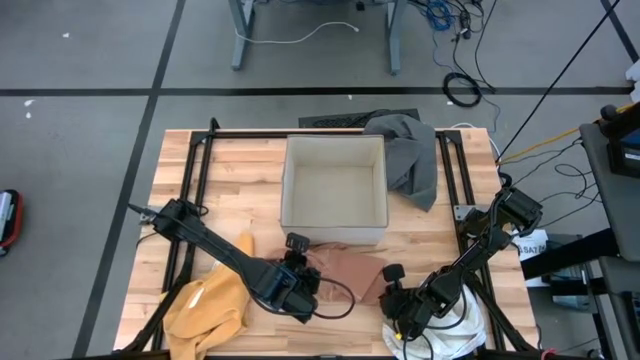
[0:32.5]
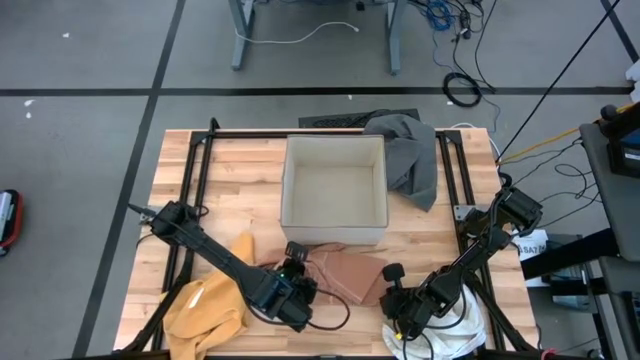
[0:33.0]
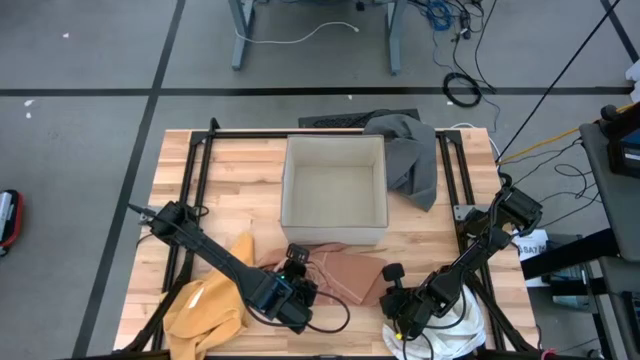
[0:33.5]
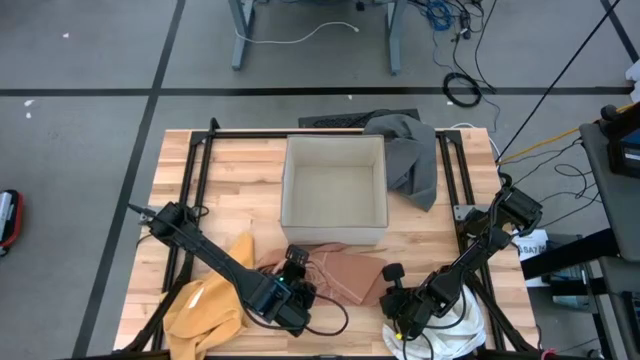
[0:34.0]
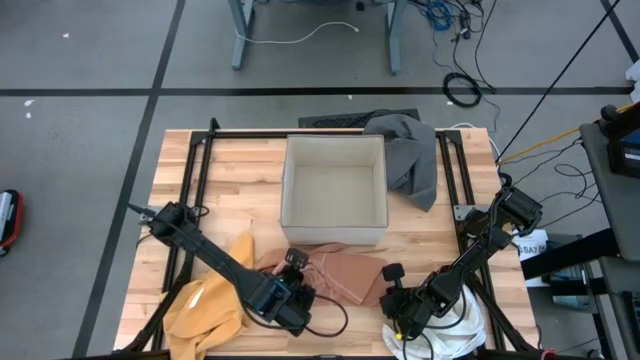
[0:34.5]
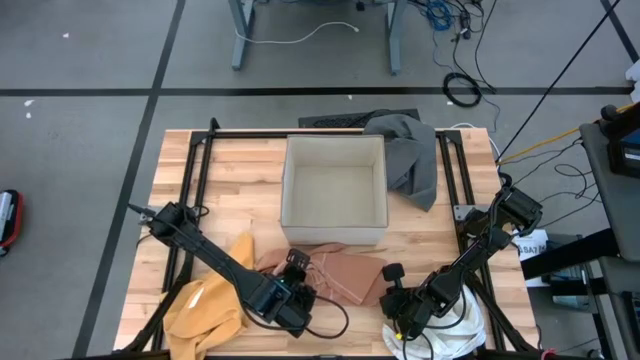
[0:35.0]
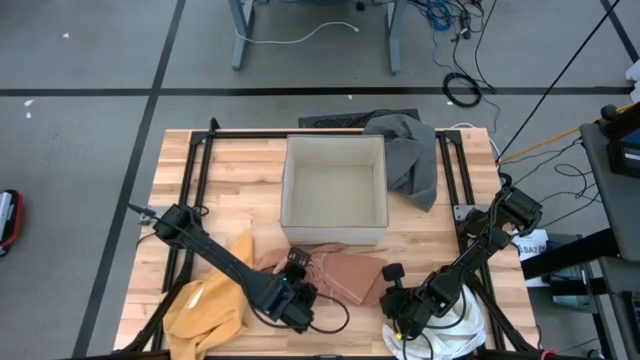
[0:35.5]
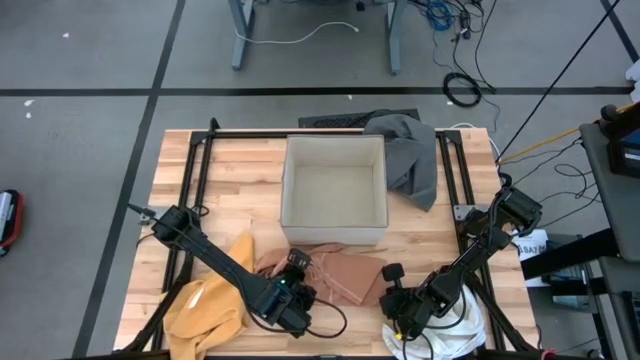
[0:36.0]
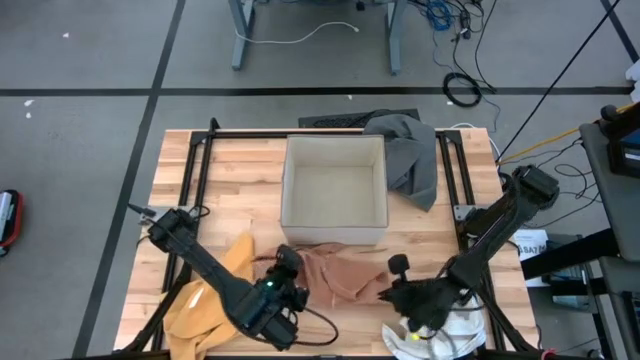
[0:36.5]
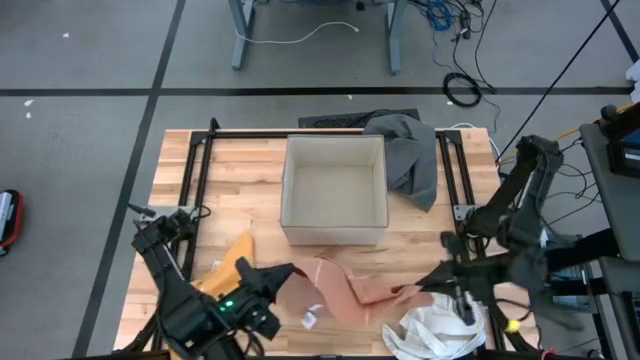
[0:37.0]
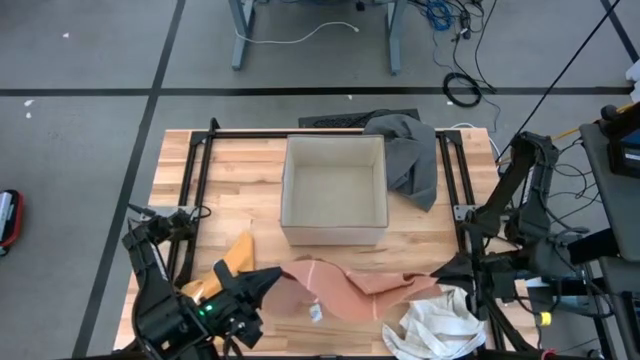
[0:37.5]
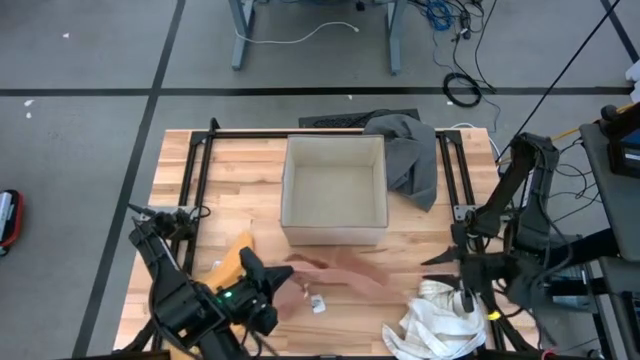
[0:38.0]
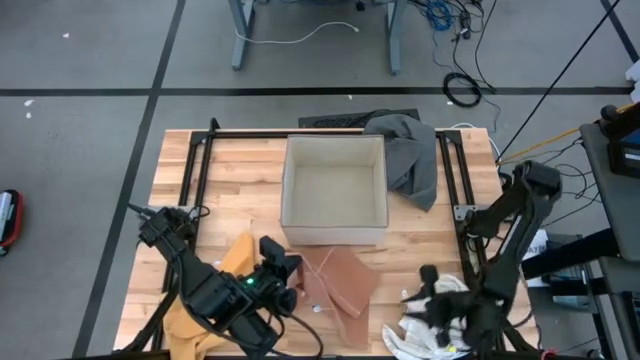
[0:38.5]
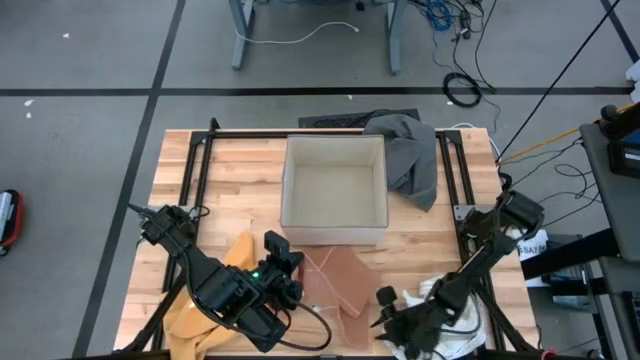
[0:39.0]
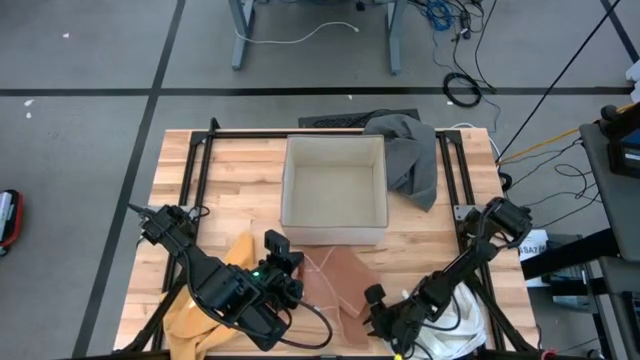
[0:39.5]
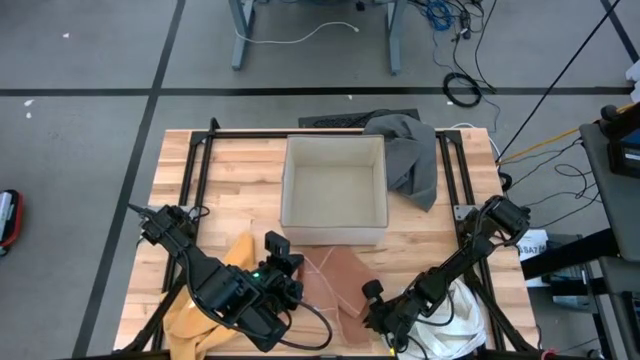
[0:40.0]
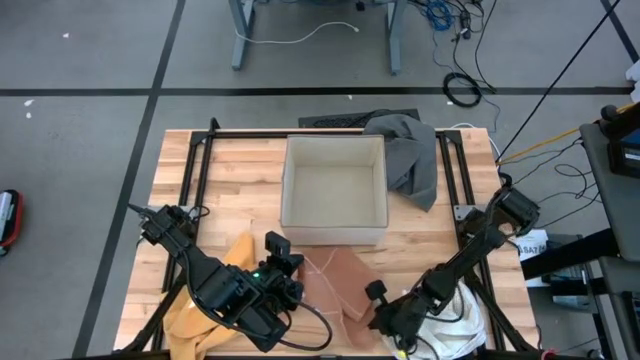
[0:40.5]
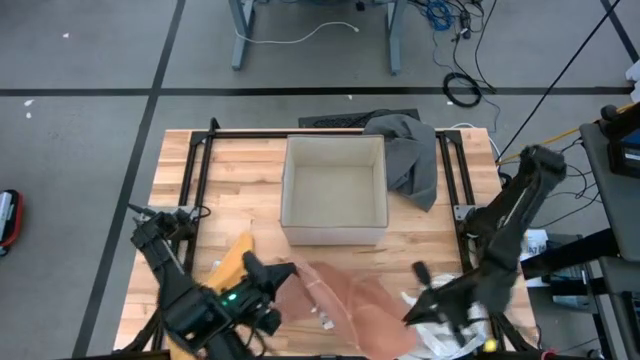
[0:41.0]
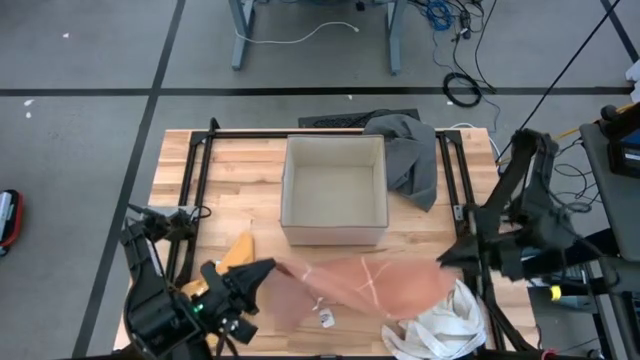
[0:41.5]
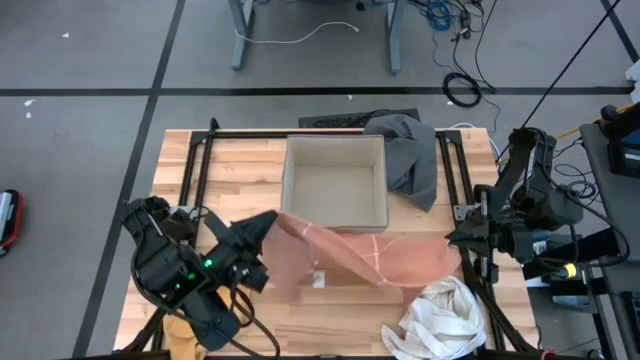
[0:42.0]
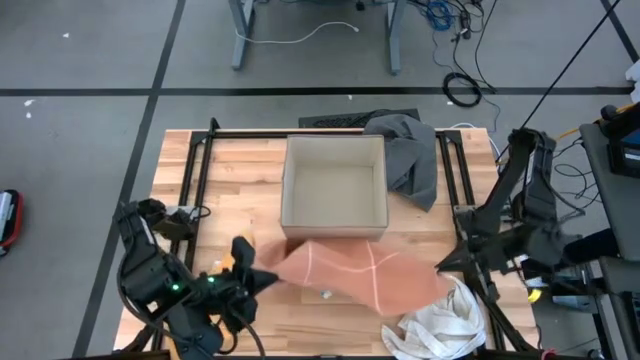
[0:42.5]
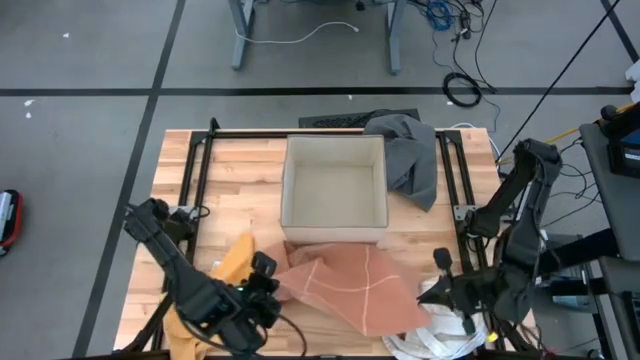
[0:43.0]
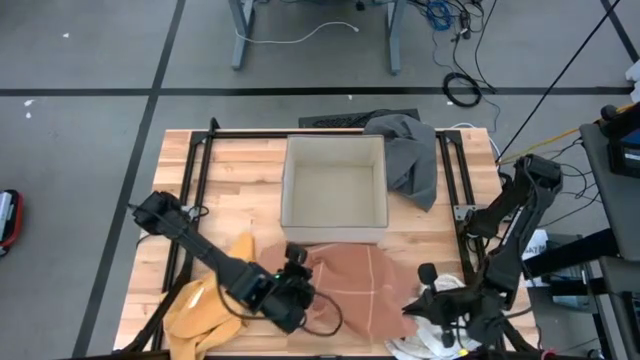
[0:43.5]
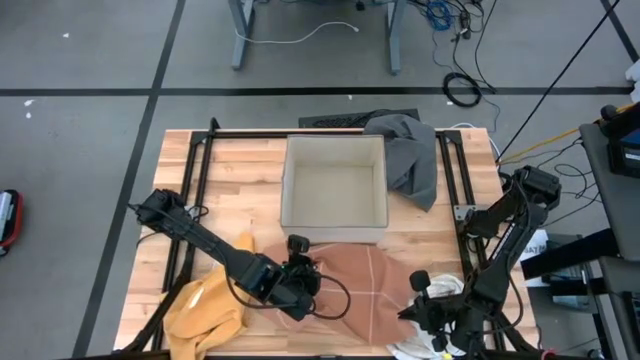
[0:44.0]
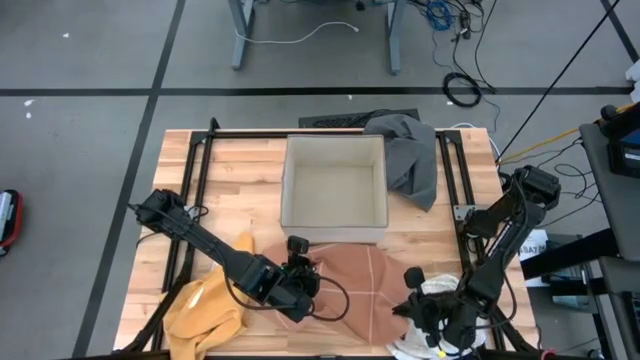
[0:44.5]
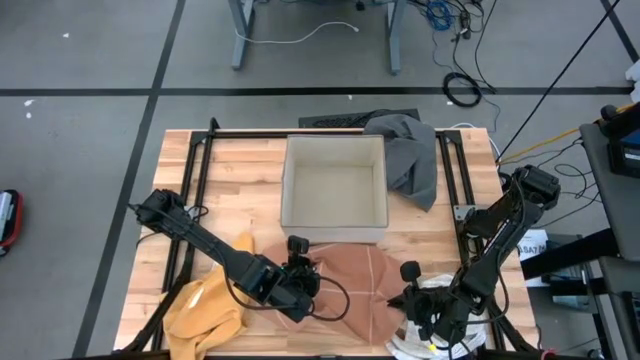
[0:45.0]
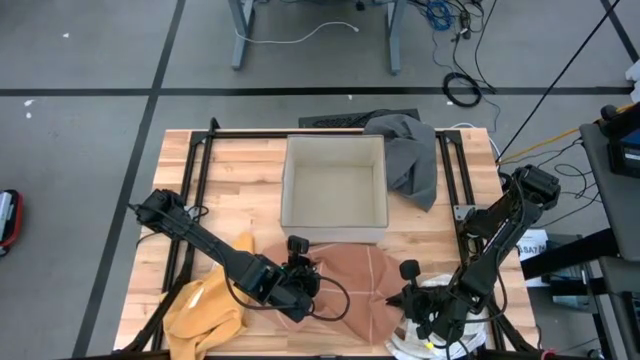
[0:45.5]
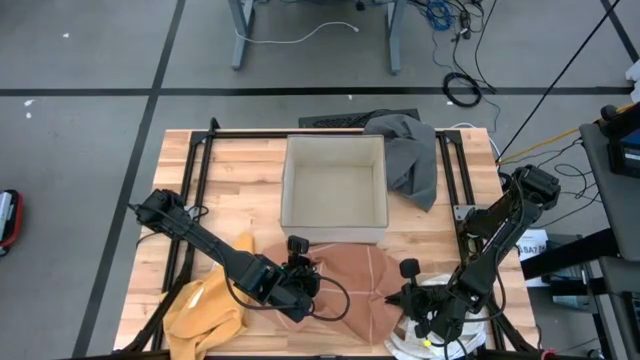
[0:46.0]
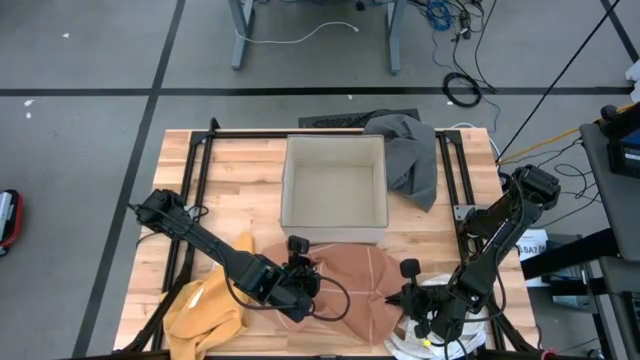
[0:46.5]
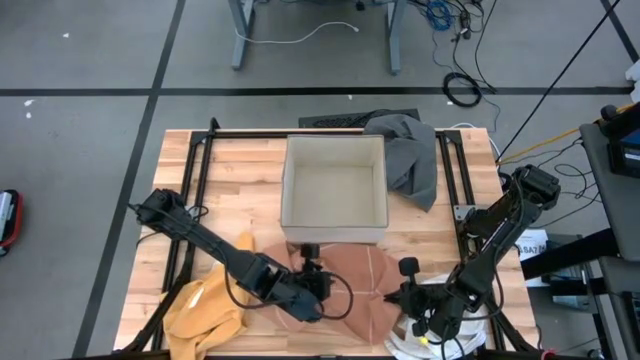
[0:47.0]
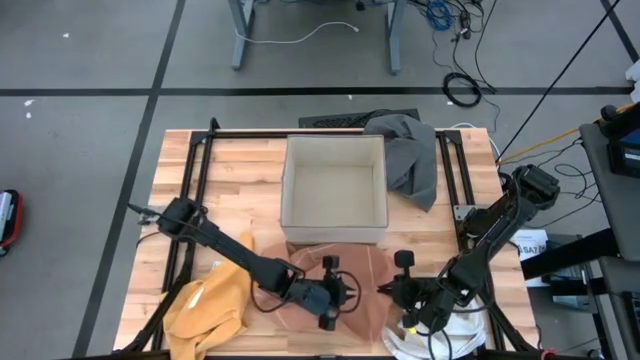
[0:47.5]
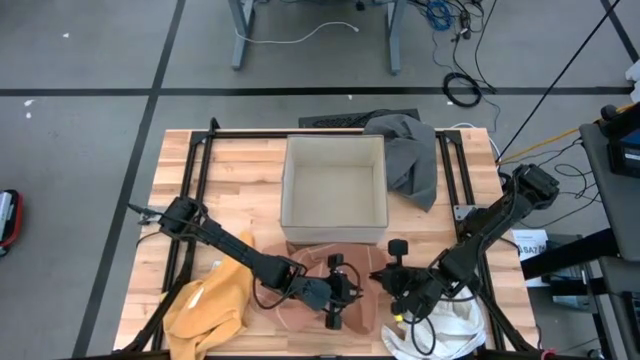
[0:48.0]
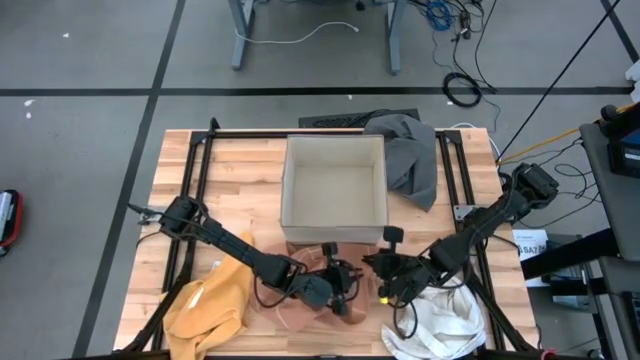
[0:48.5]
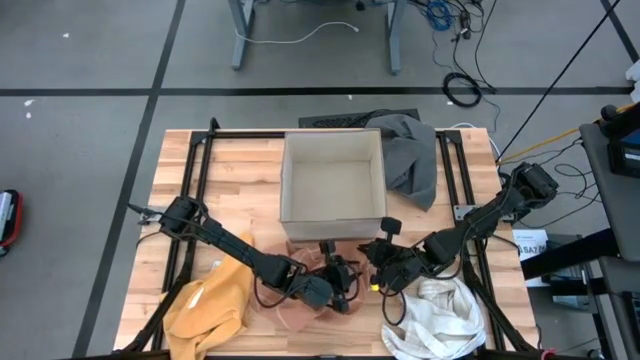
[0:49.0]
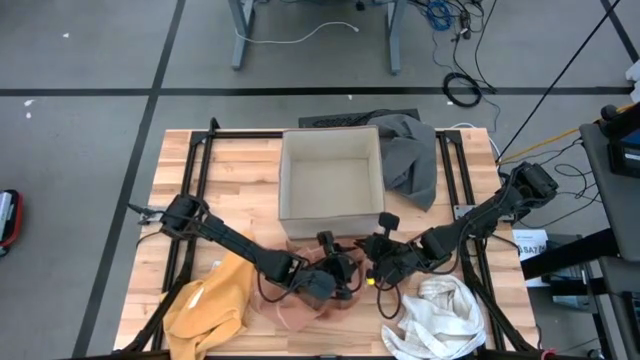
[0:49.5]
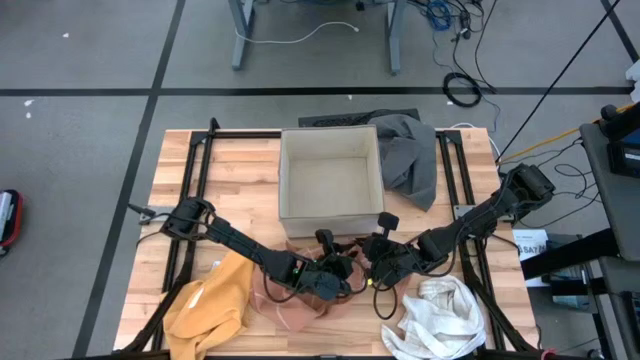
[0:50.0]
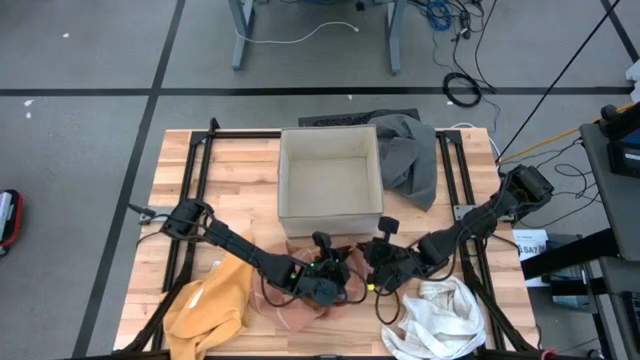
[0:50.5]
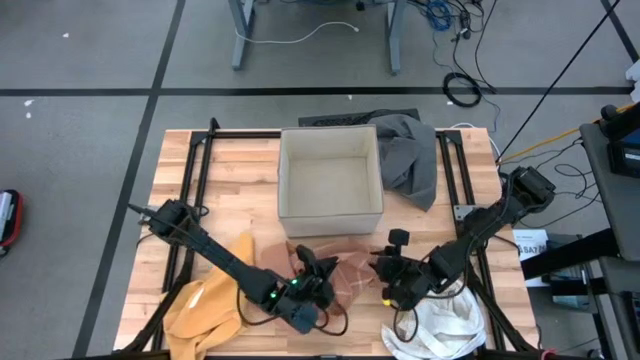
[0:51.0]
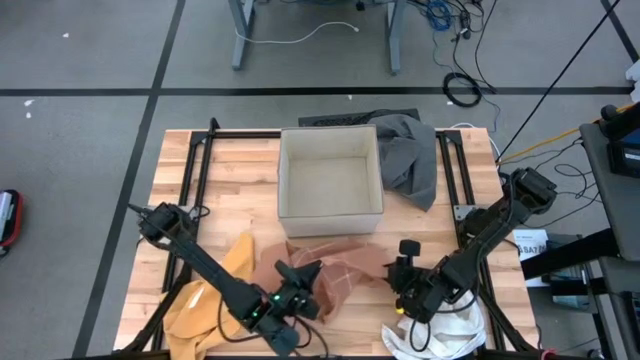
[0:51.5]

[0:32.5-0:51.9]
Task: Fold towel
Fold the brown towel
